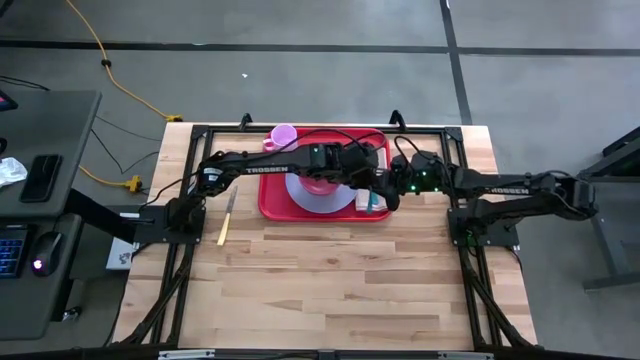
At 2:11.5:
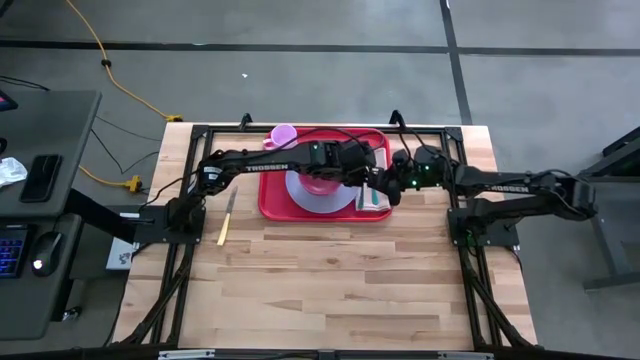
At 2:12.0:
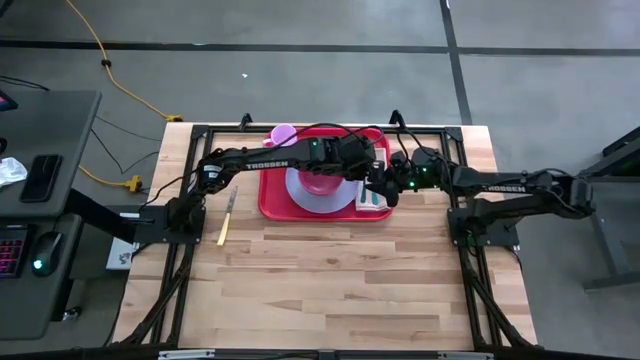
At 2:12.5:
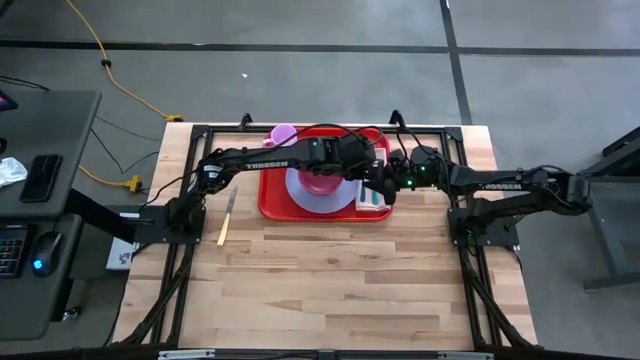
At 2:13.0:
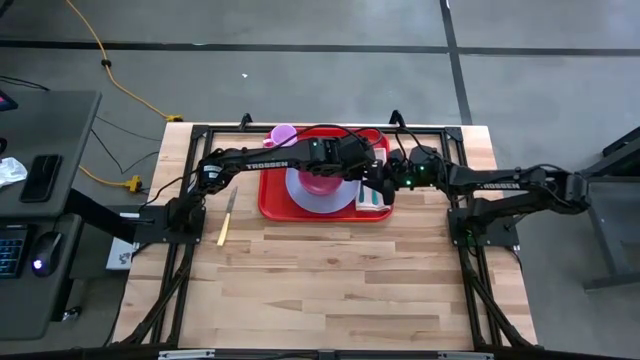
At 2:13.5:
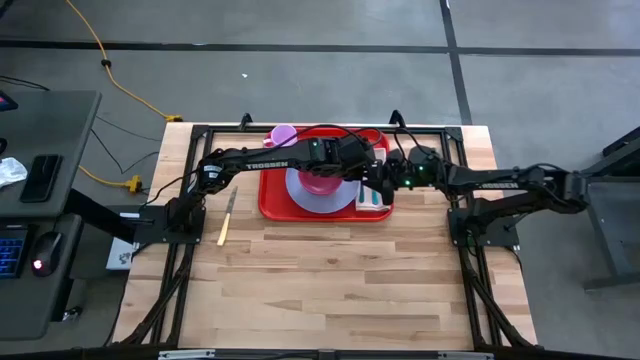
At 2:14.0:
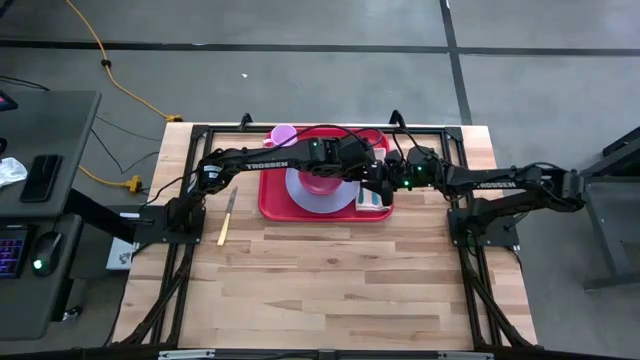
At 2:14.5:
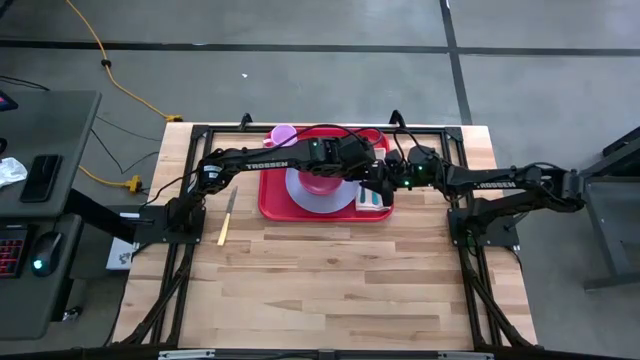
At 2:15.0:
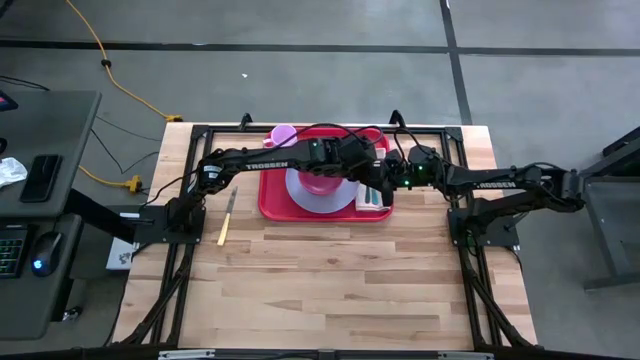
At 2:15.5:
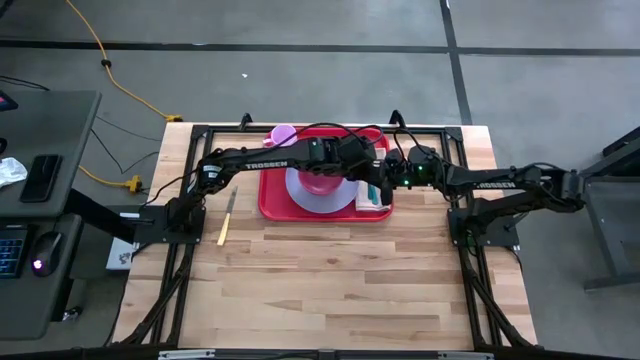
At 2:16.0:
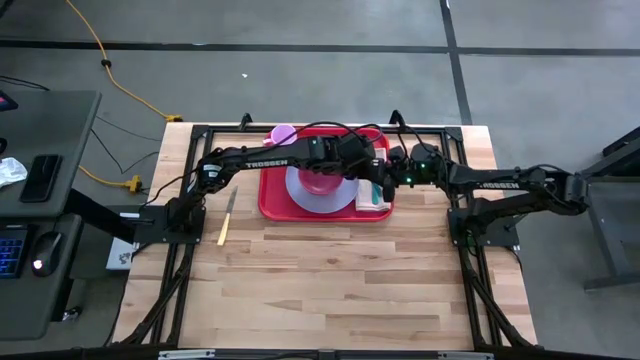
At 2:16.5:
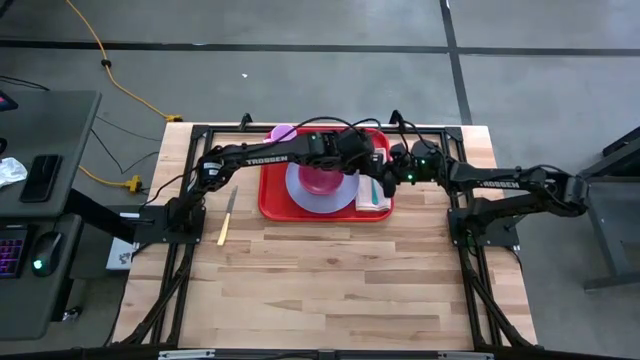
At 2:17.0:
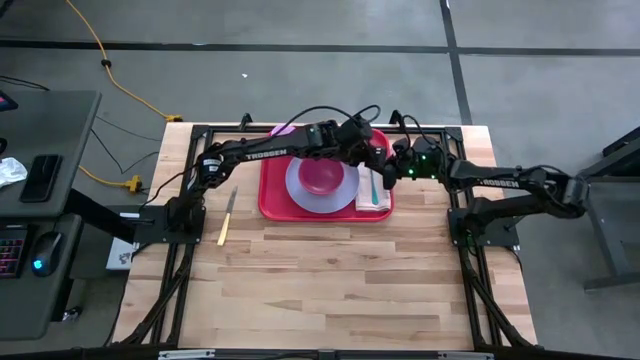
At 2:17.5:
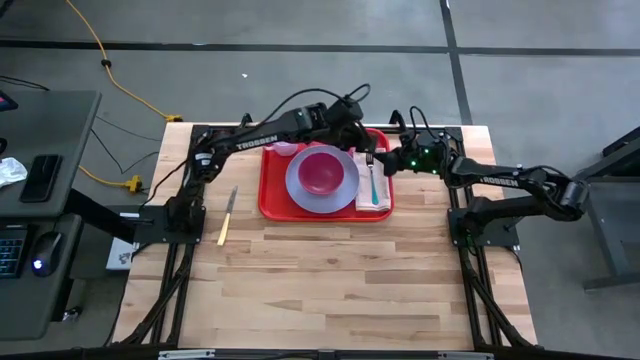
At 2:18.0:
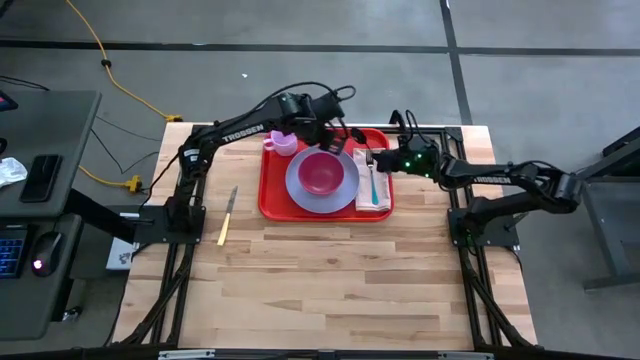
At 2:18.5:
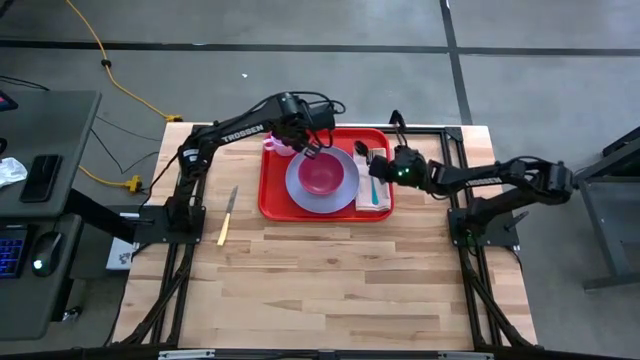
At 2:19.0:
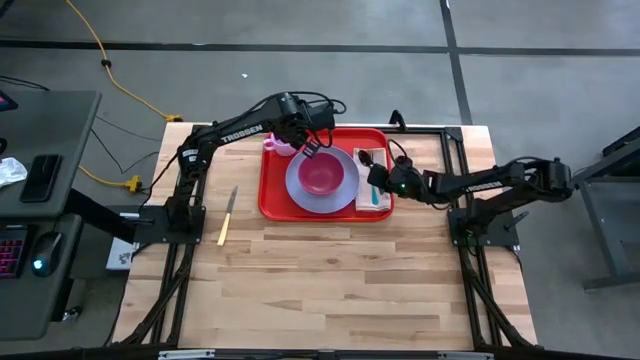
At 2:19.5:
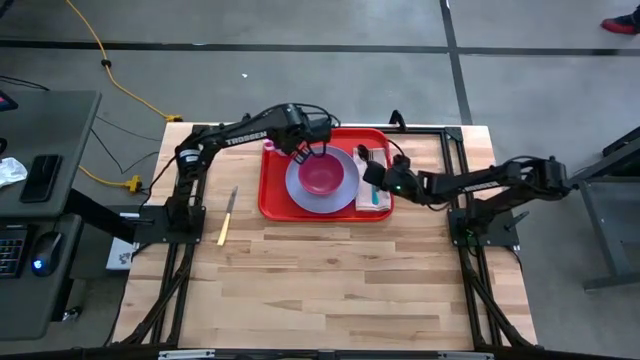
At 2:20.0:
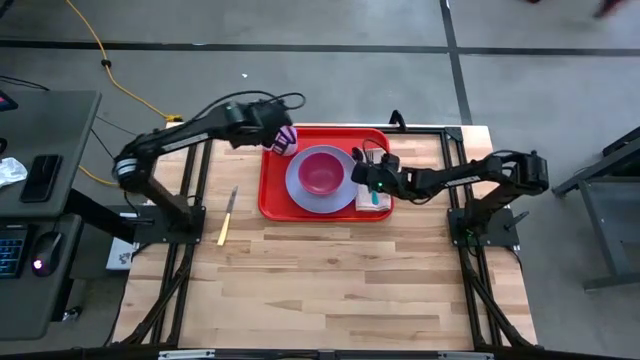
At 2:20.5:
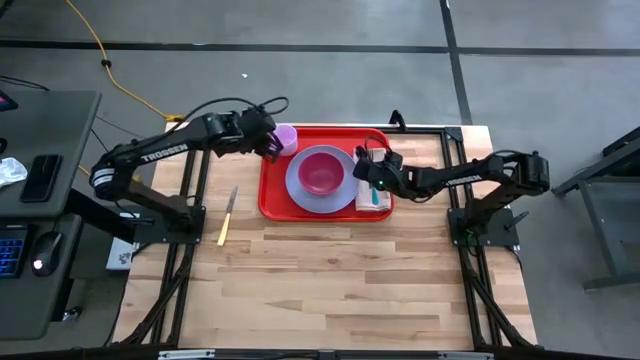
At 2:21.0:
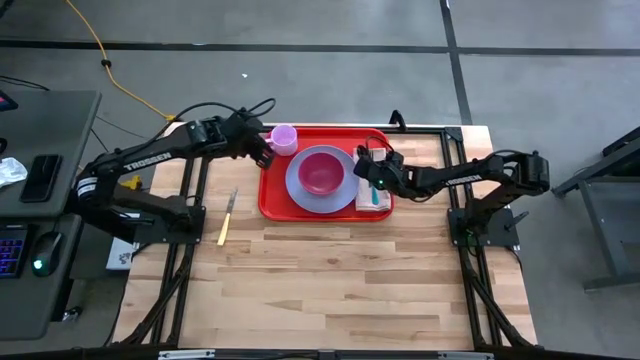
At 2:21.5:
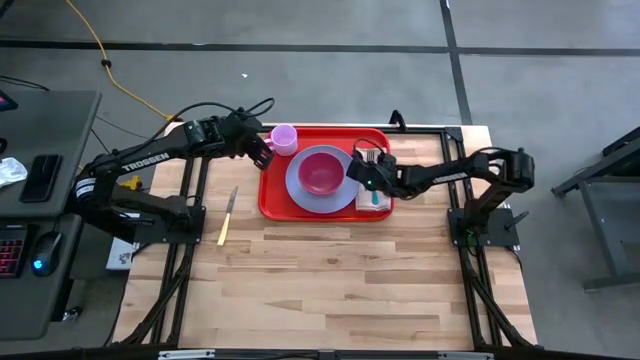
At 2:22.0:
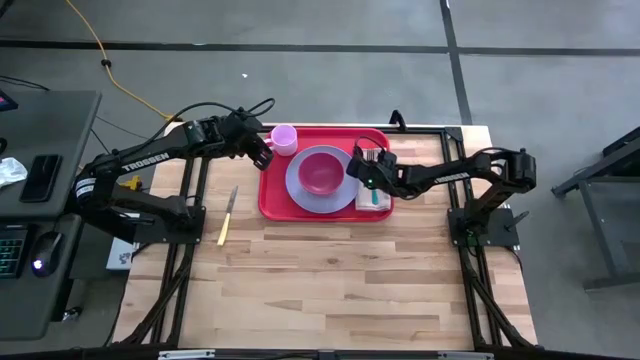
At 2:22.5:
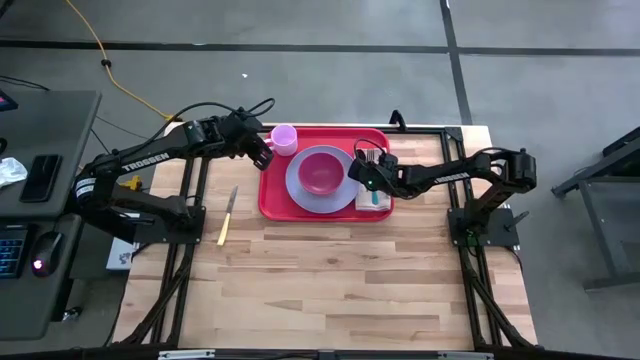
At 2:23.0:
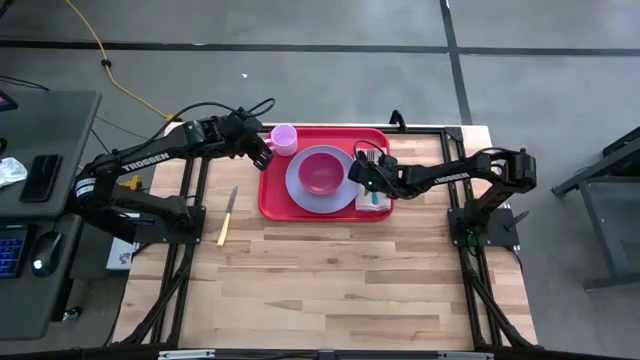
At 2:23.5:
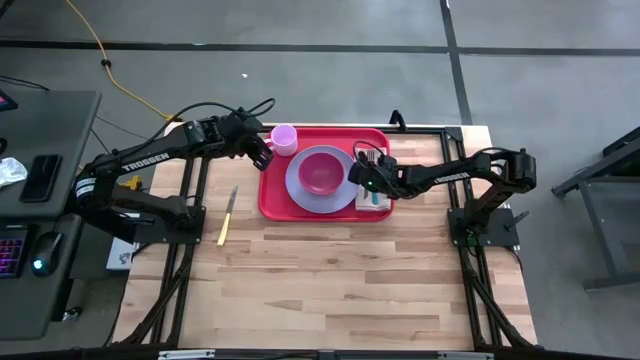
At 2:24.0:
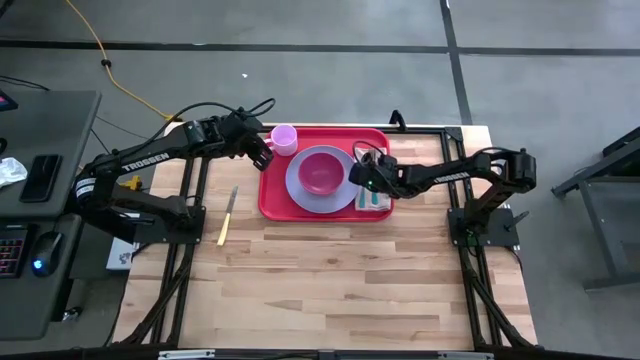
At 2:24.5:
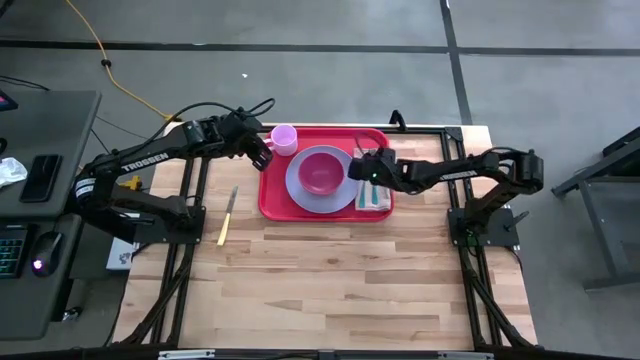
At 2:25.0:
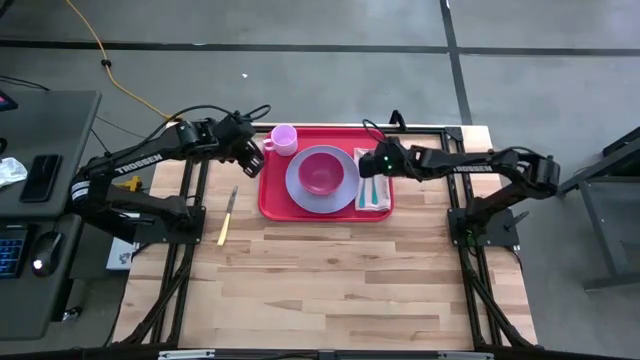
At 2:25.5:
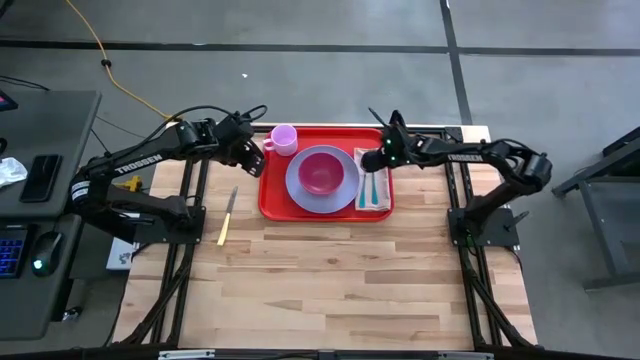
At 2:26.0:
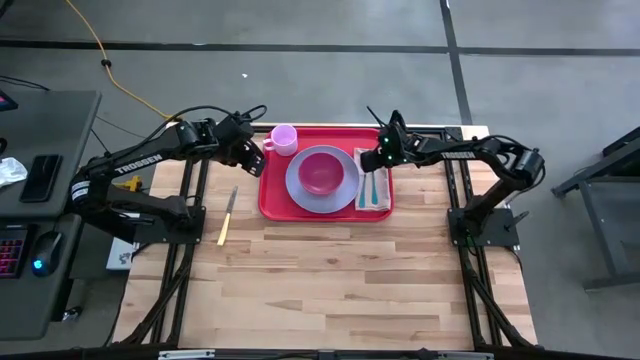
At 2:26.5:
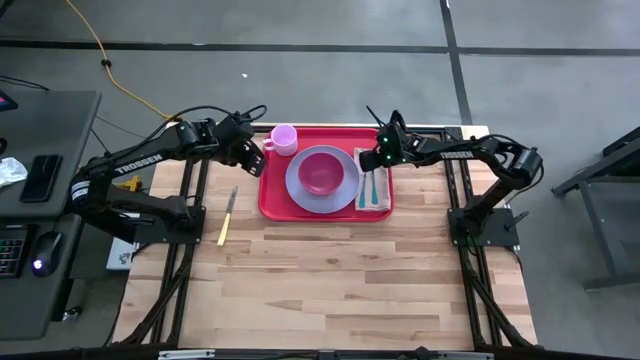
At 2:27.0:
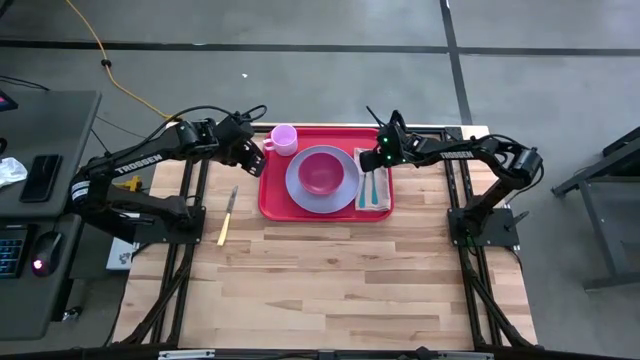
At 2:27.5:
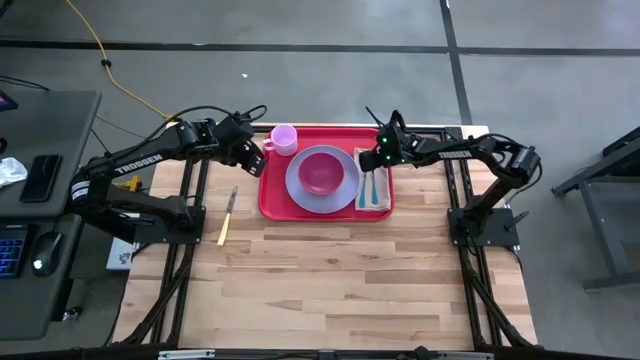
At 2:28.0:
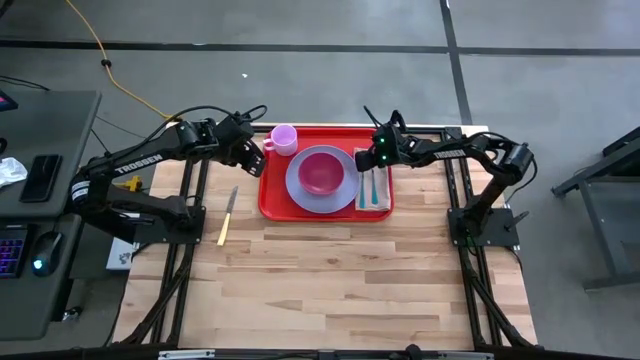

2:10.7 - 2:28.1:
Task: Set up tray
Put the blue spoon to the left of the blue fork on the brown napkin on the orange serving tray

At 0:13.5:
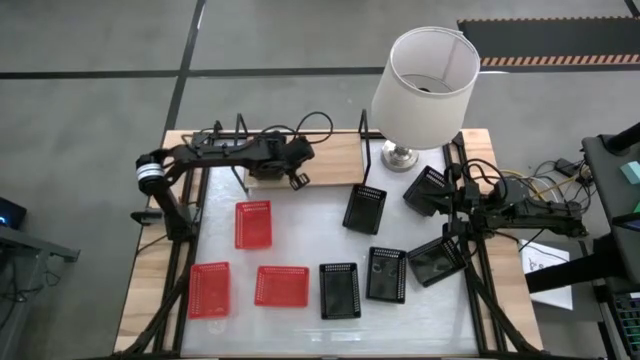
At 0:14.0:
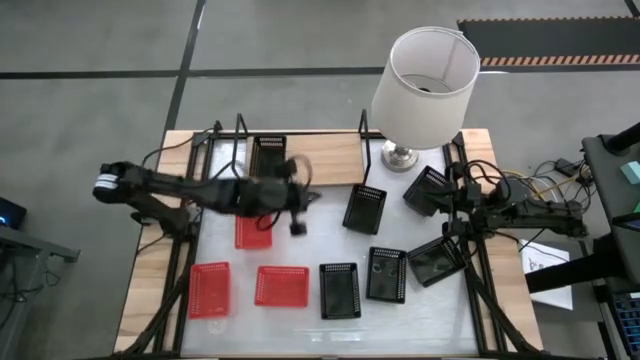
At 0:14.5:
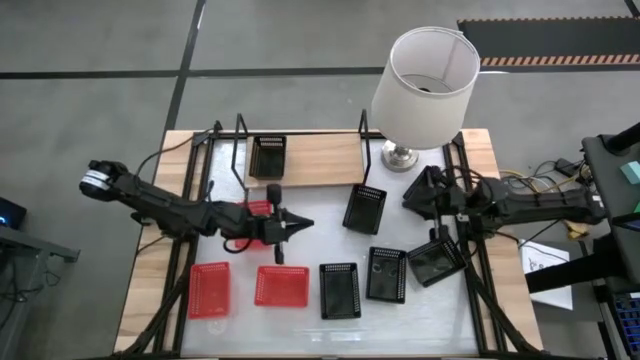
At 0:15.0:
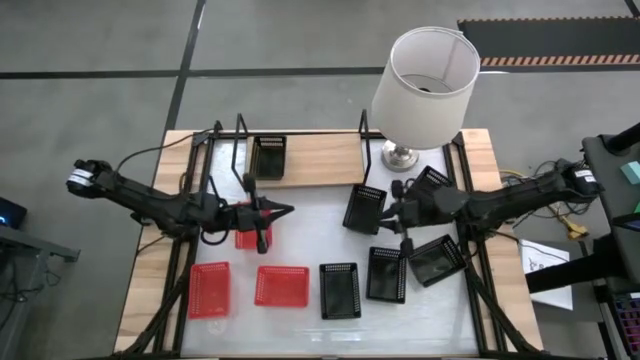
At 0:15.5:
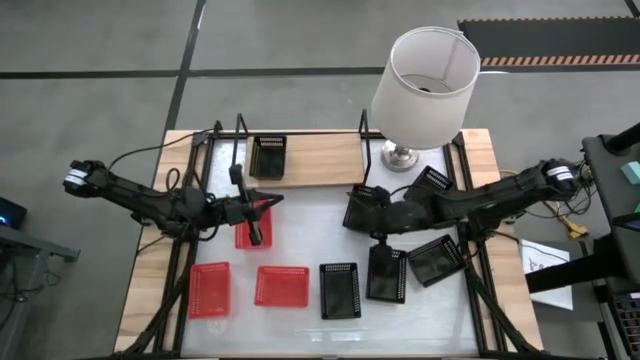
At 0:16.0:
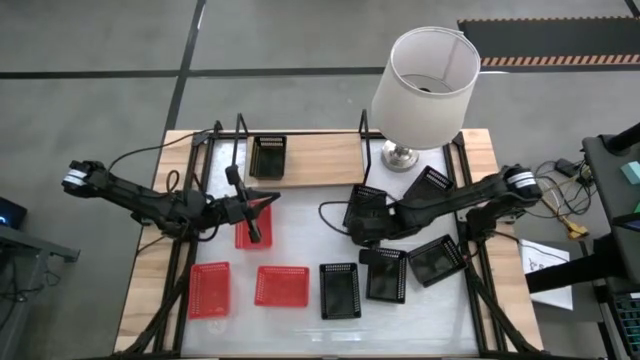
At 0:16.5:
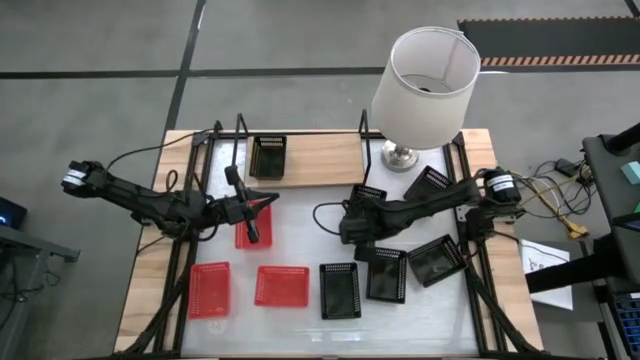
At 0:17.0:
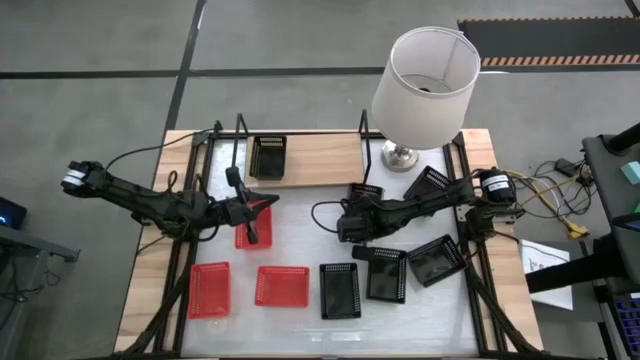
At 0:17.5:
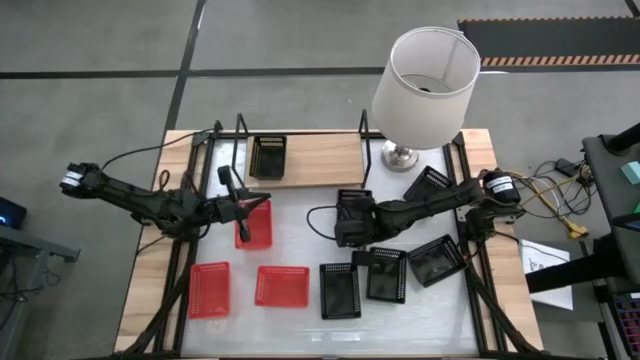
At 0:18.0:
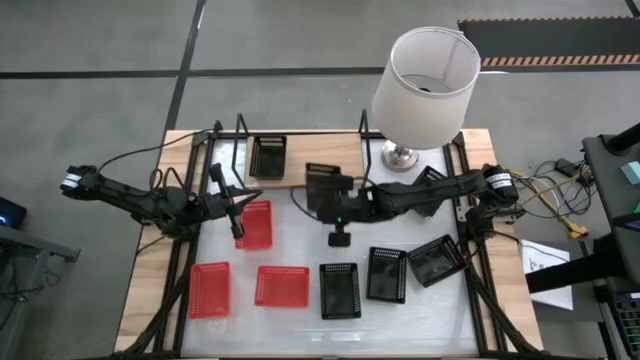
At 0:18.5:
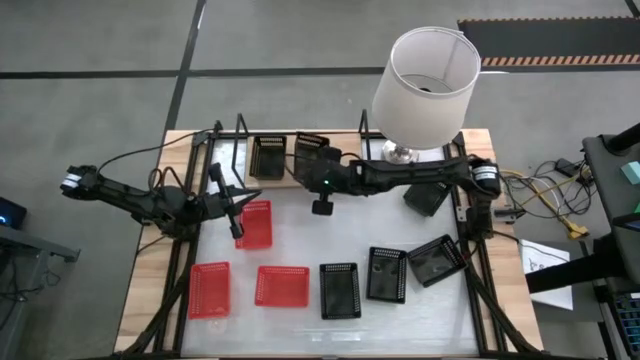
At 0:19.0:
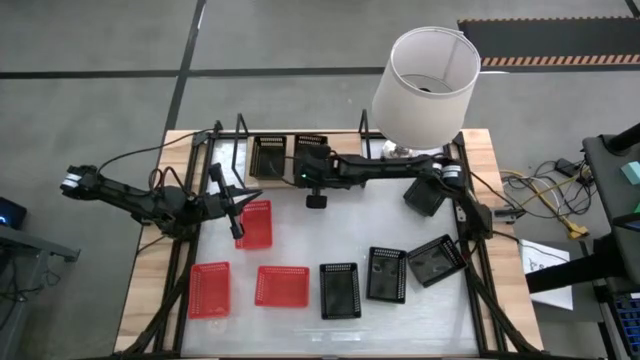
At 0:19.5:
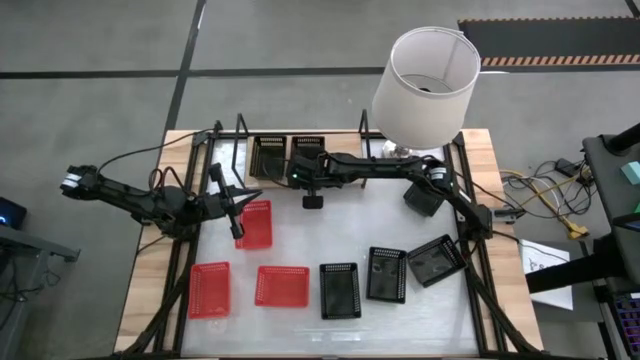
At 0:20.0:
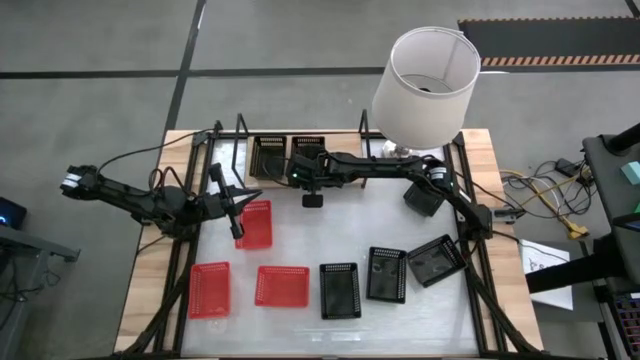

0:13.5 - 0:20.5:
Task: Stack baskets on shelf by color
Put the black bin on the shelf
